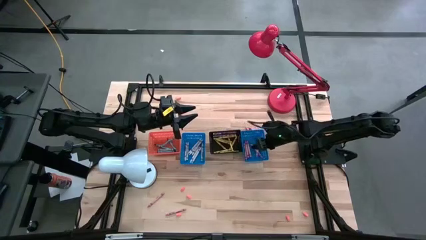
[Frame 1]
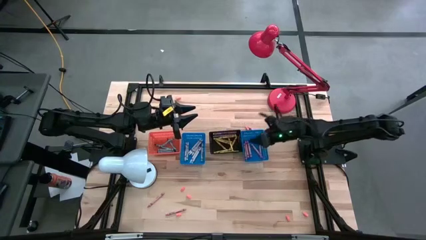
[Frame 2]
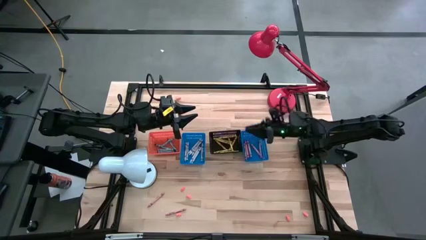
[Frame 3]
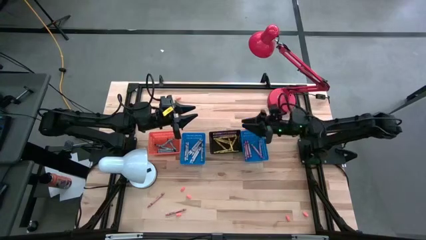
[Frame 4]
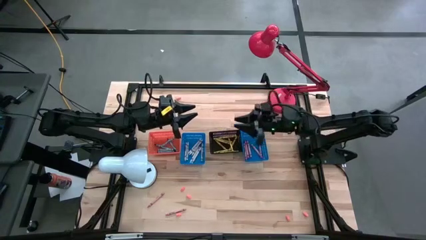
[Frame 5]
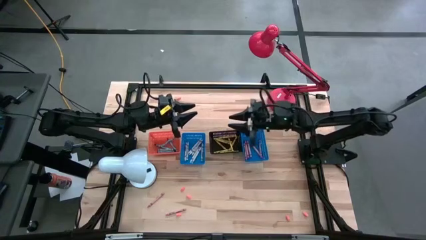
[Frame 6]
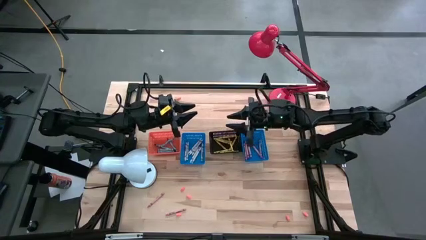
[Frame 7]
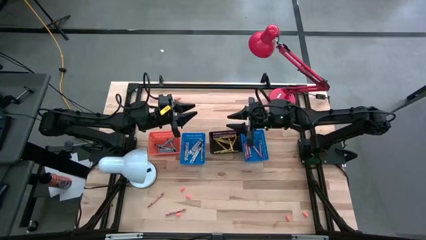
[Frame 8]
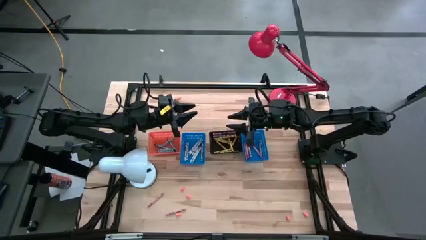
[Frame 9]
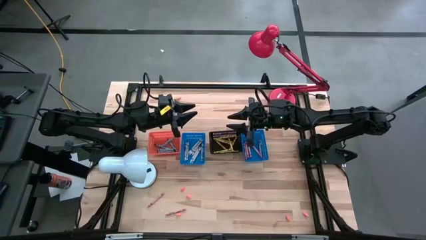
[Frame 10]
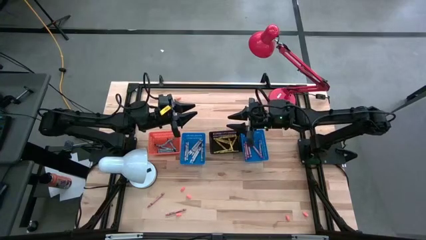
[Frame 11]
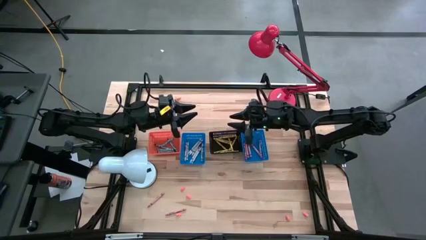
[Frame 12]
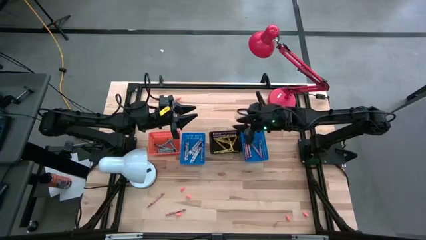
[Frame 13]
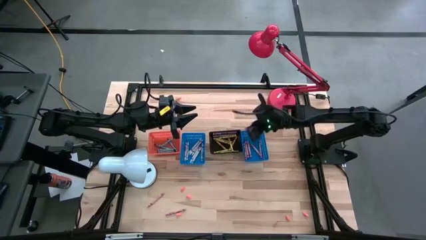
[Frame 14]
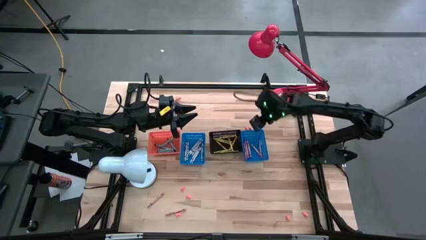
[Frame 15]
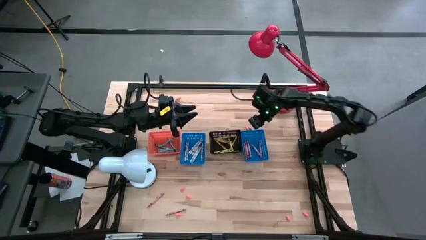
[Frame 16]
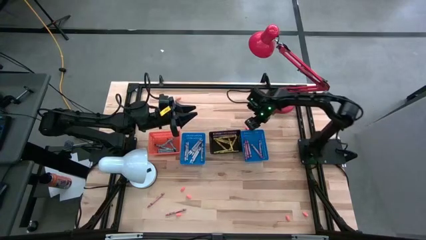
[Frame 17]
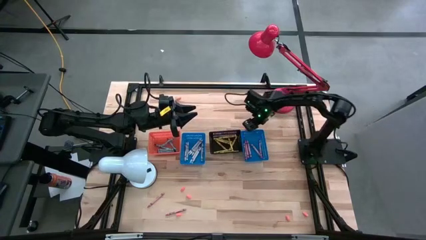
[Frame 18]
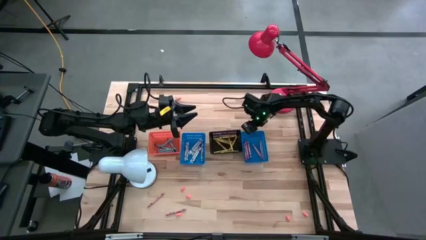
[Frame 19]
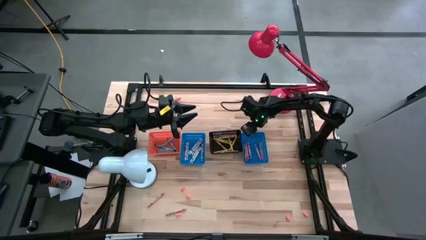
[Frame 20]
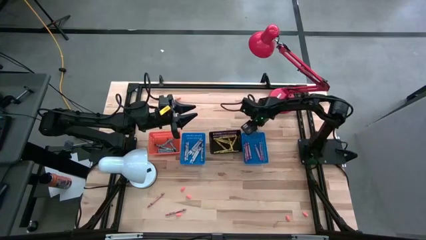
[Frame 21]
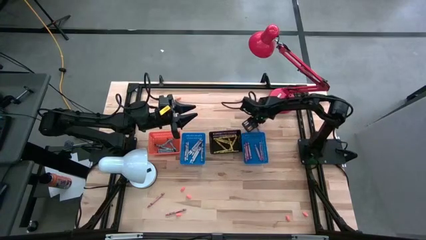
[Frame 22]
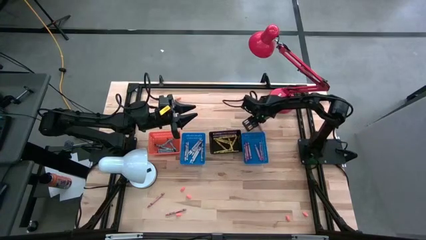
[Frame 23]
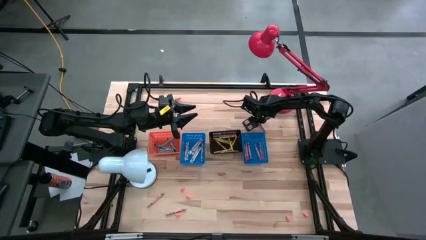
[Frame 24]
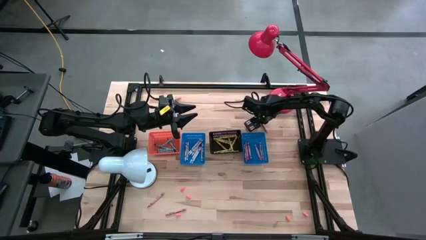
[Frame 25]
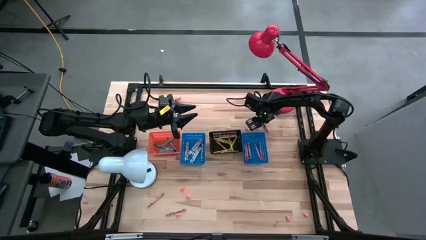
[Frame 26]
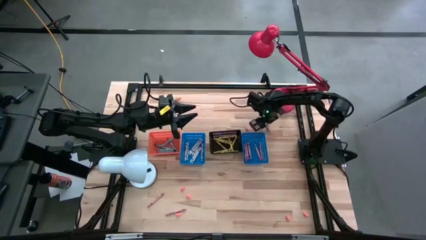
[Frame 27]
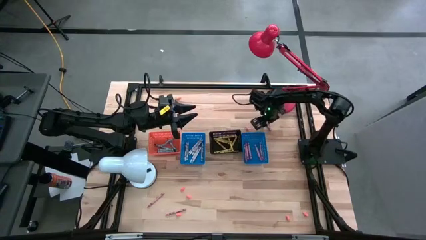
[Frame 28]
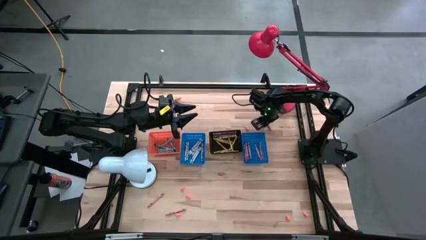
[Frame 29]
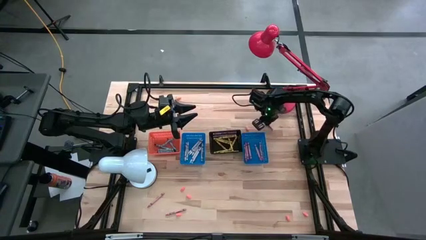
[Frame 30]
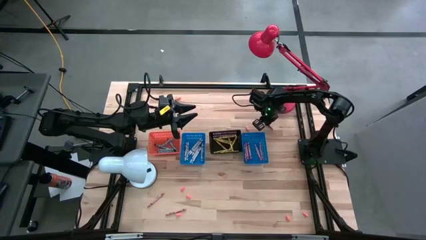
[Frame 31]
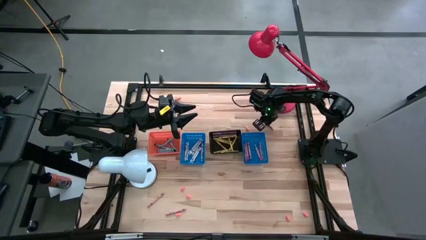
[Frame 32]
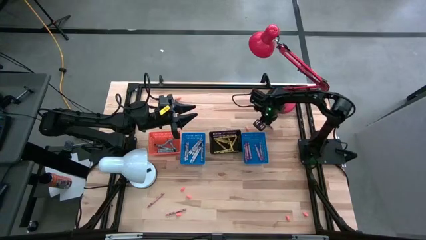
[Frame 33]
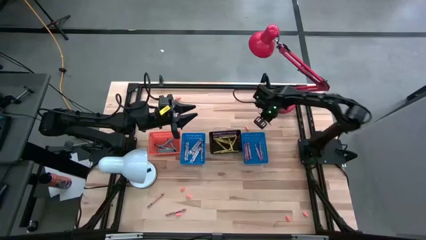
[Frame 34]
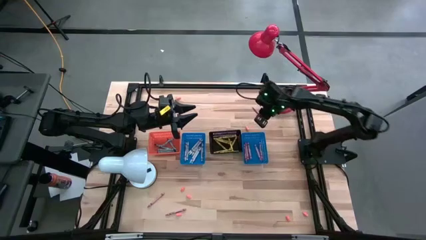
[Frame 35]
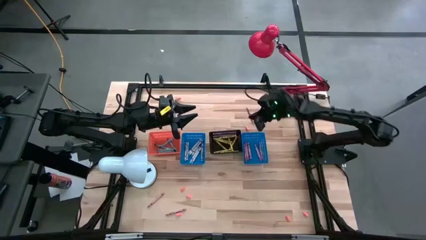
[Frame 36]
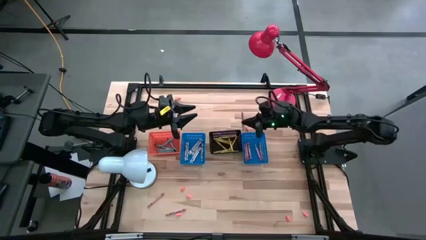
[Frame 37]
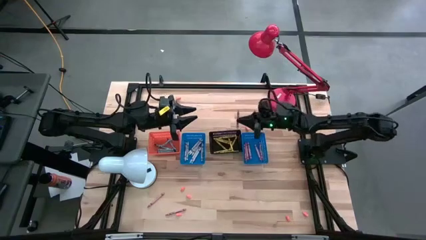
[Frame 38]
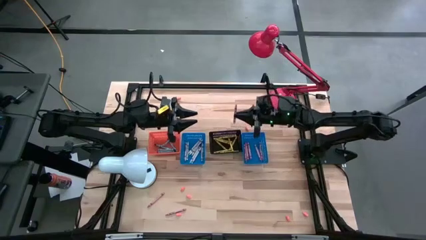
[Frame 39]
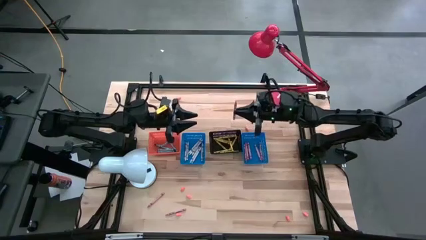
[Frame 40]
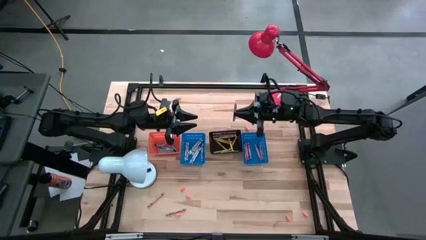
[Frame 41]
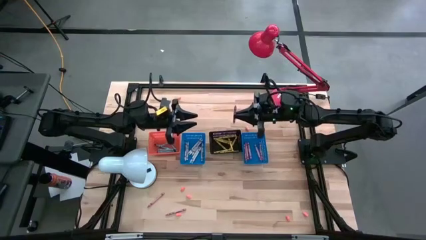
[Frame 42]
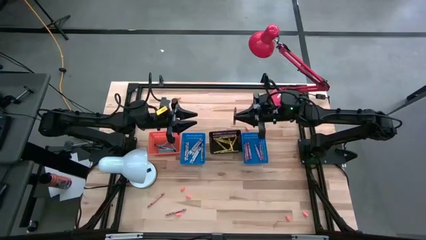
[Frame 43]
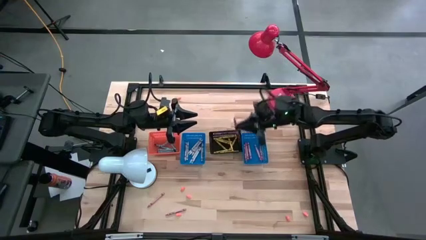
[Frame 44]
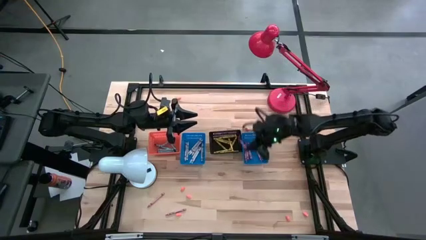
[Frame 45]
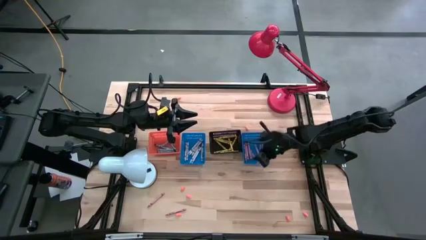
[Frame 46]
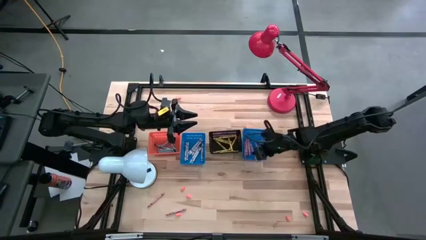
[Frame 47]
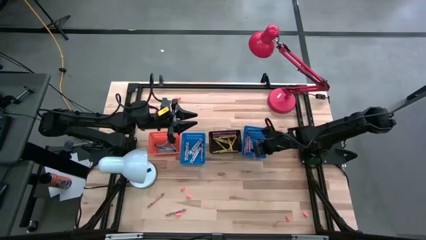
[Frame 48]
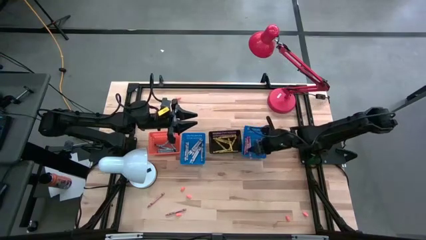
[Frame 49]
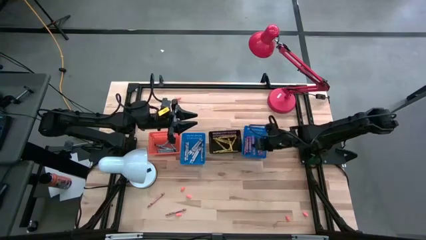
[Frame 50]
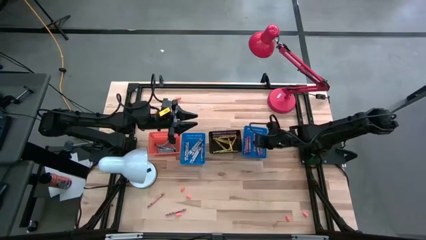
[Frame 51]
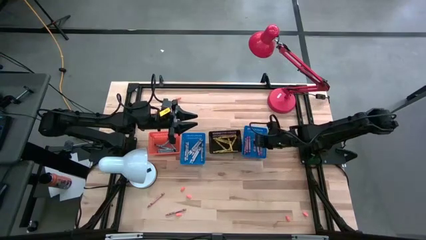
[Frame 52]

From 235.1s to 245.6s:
Task: Sort crayons
Put the top right pink crayon into the right blue bin

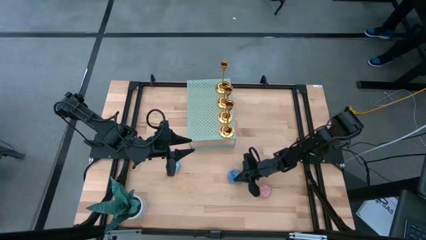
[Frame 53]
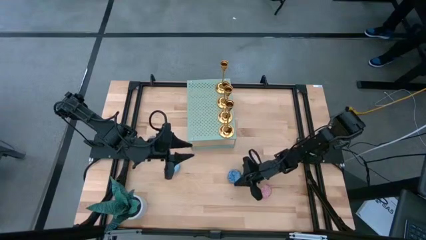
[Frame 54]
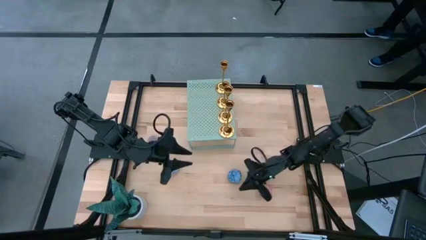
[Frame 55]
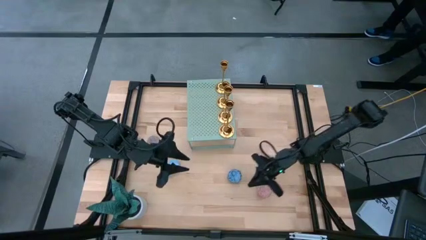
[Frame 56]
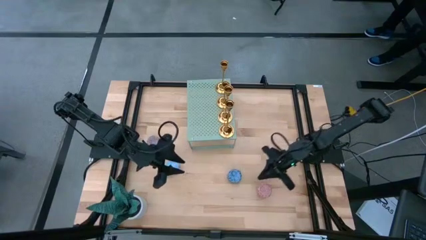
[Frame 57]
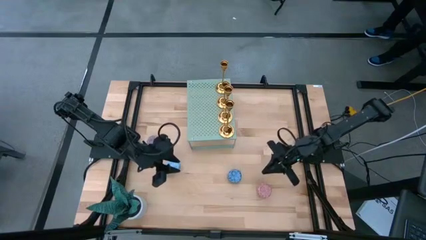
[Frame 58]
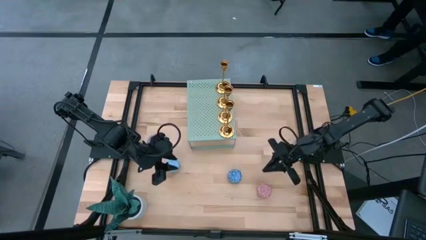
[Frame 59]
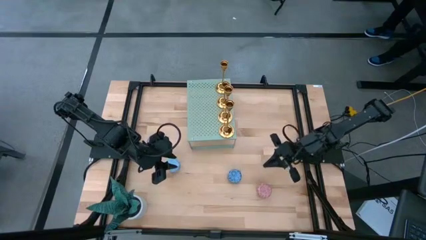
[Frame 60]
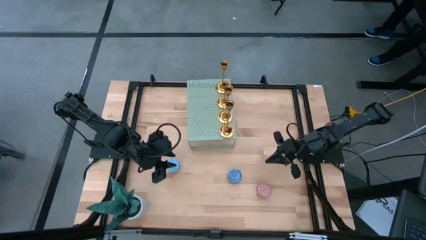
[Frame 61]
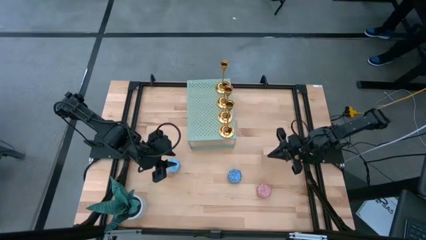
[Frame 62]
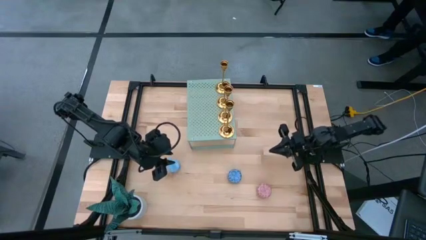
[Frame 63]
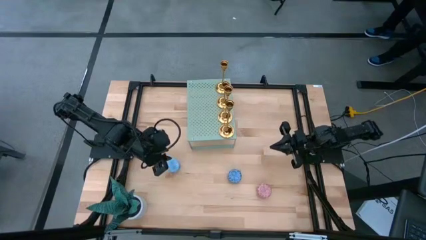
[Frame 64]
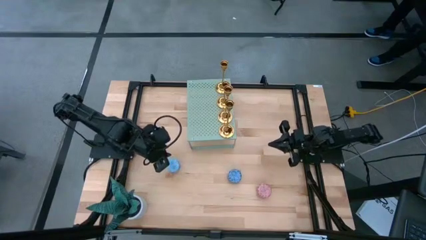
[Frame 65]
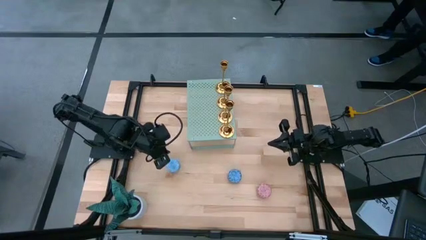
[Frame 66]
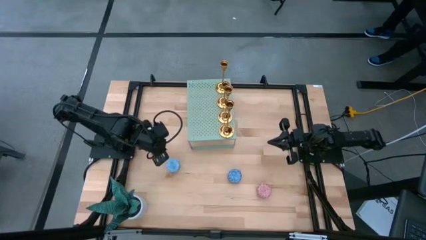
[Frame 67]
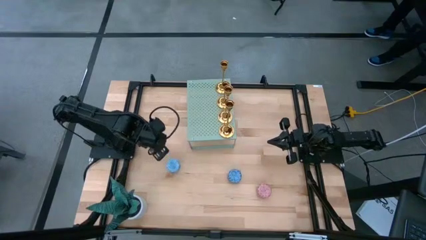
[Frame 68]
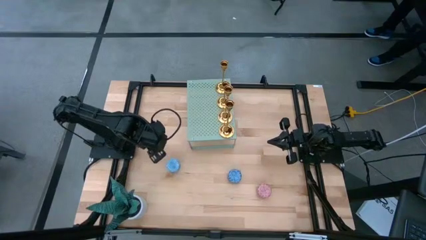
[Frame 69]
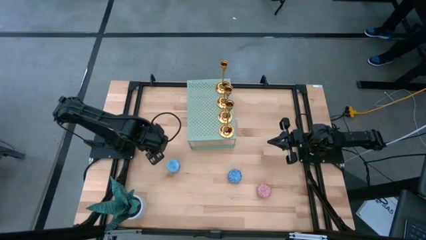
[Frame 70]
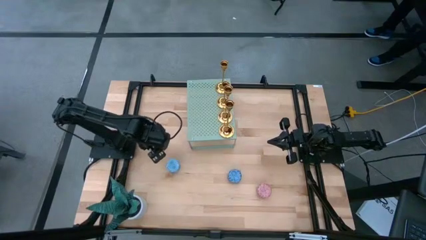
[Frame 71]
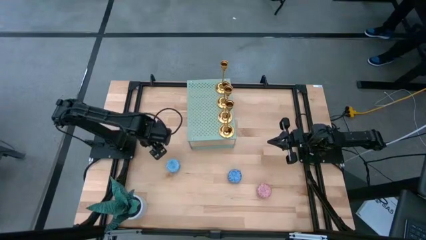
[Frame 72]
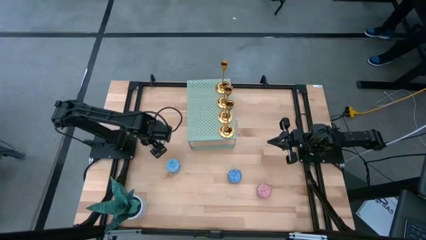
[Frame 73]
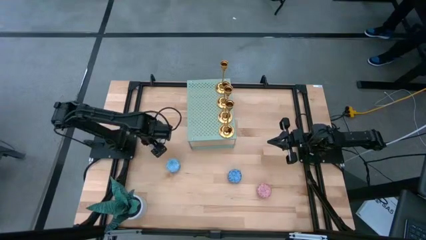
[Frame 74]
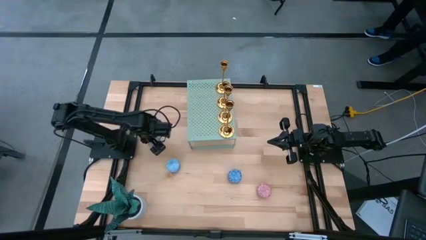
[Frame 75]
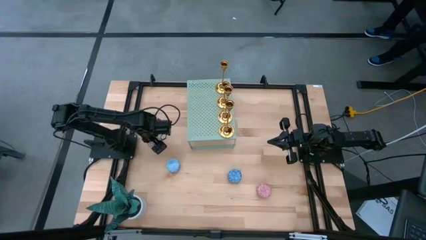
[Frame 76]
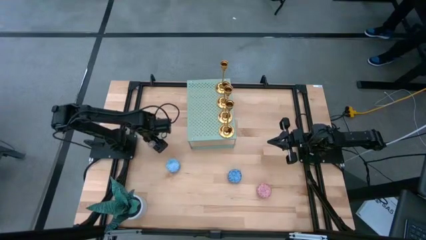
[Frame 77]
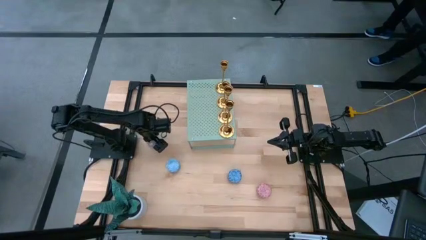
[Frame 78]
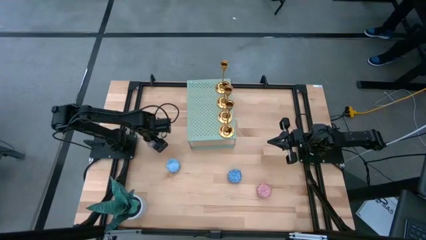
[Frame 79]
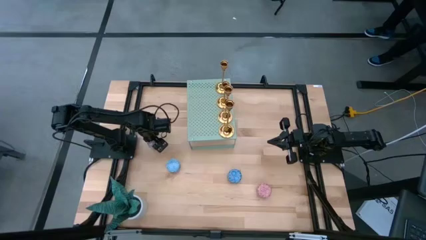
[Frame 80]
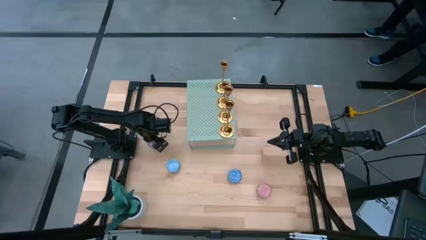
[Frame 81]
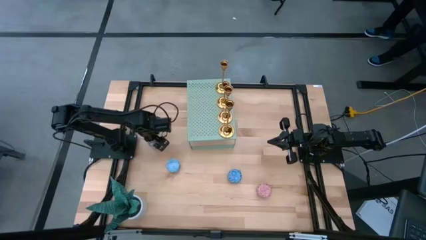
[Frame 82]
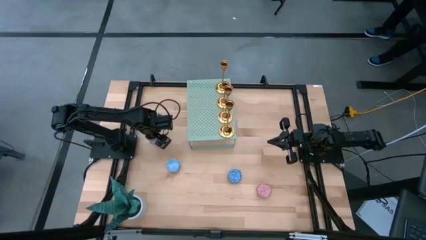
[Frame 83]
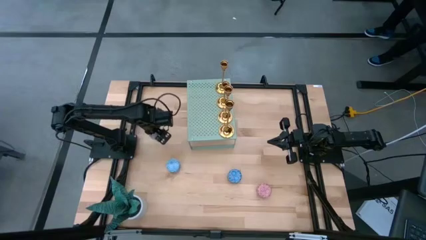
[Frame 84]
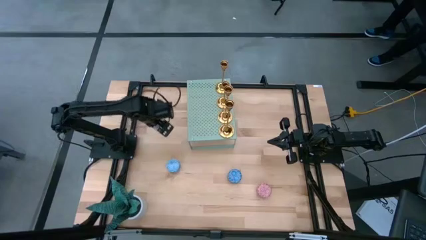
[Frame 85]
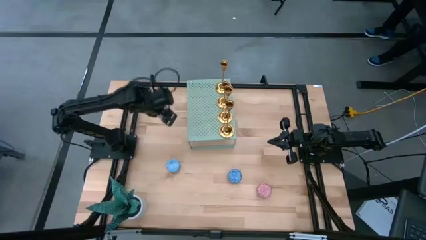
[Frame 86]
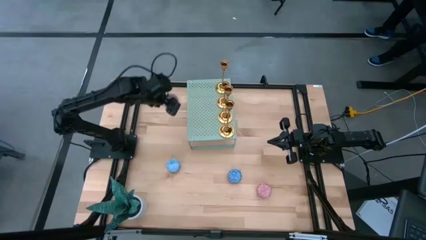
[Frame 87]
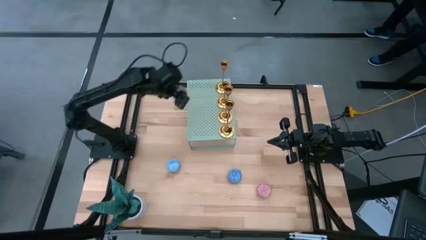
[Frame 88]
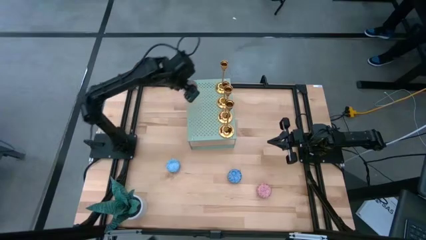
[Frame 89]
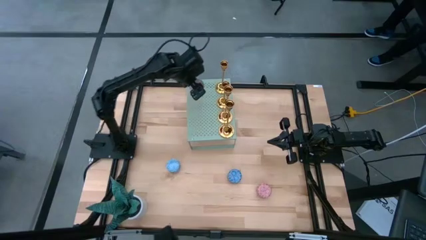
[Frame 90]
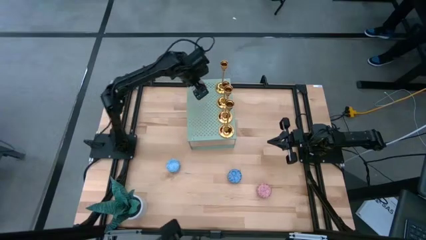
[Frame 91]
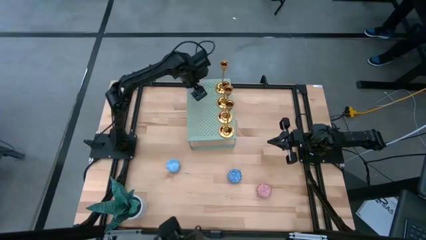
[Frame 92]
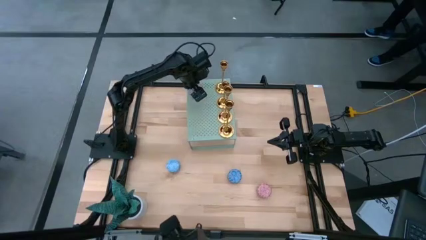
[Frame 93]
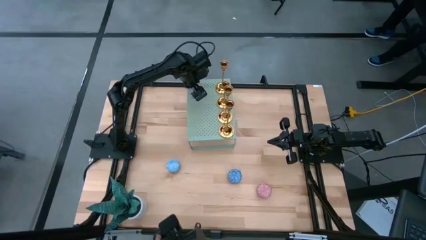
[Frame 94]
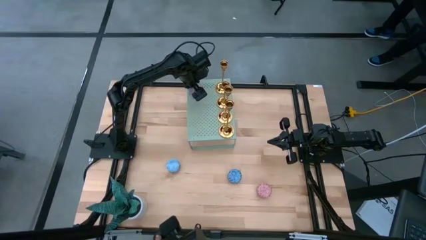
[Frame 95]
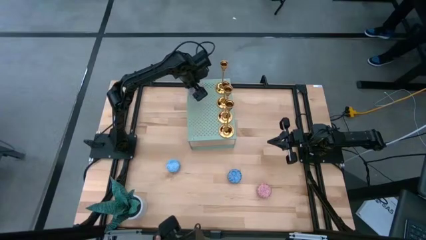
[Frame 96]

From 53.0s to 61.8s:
Task: Pick & Place candle stick holders
Put the red scented candle on the shelf
